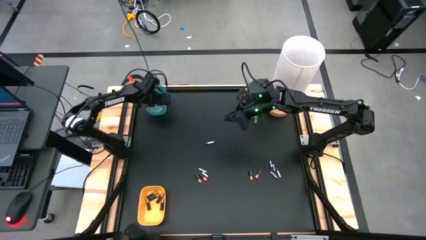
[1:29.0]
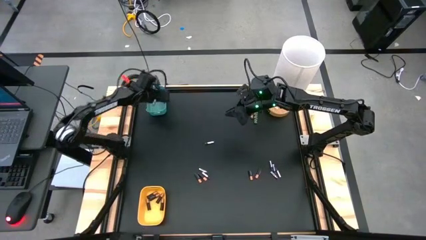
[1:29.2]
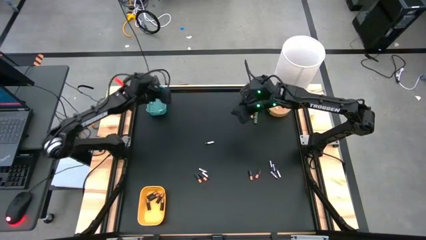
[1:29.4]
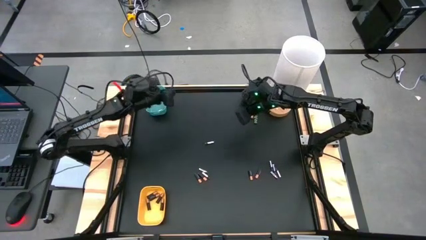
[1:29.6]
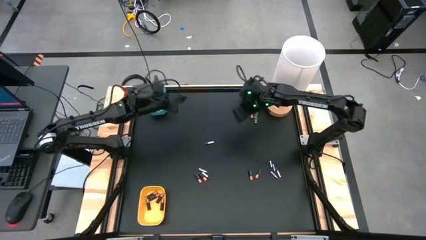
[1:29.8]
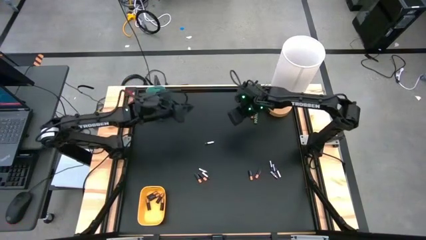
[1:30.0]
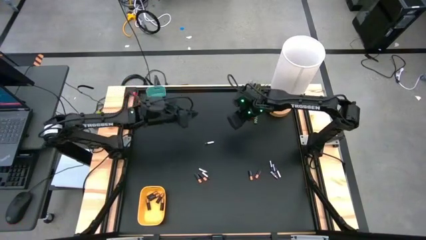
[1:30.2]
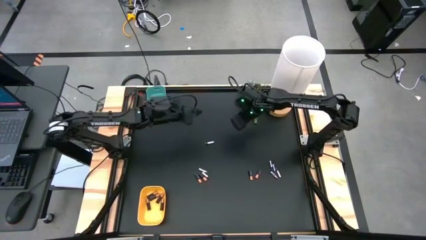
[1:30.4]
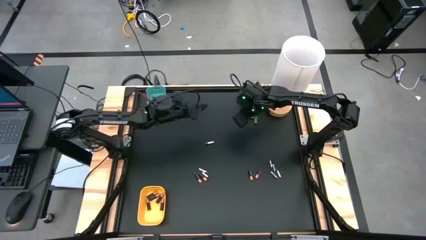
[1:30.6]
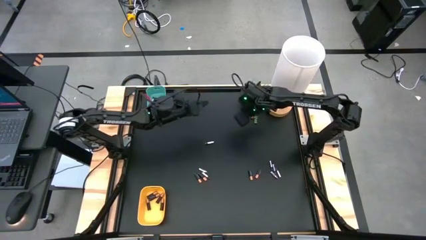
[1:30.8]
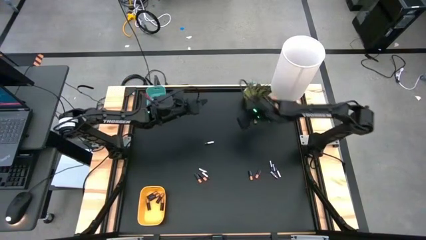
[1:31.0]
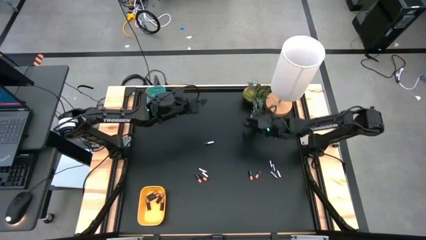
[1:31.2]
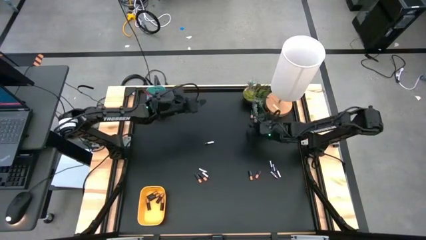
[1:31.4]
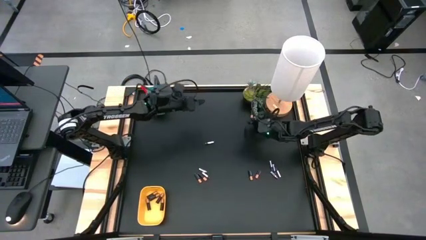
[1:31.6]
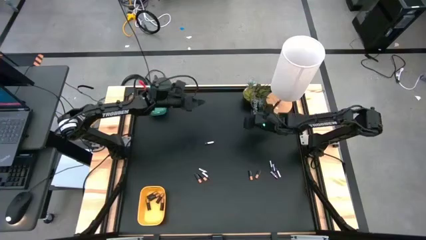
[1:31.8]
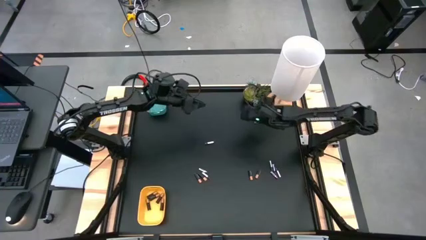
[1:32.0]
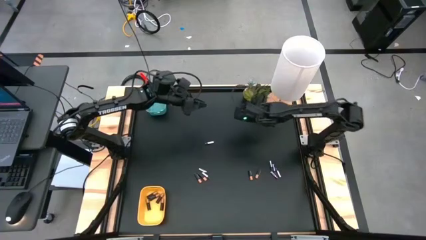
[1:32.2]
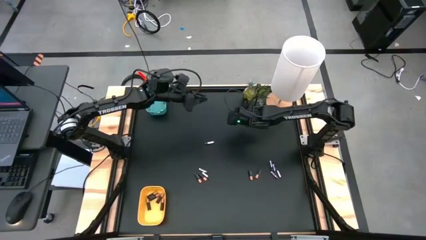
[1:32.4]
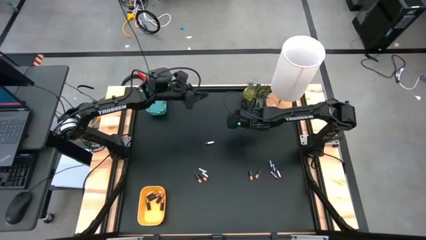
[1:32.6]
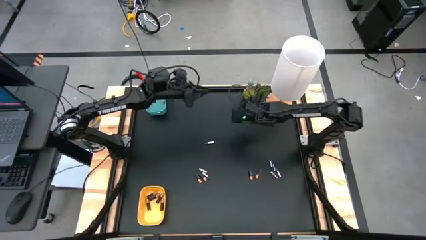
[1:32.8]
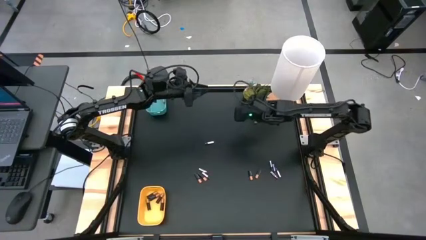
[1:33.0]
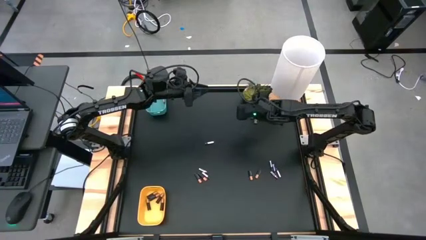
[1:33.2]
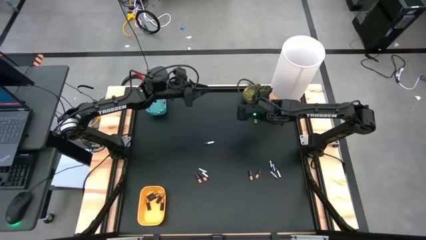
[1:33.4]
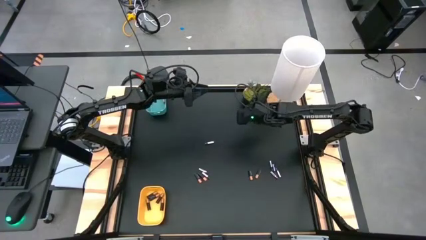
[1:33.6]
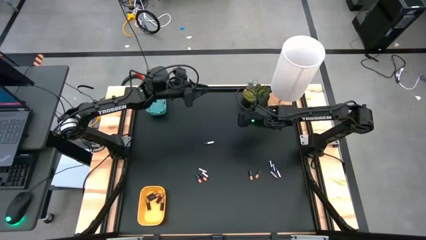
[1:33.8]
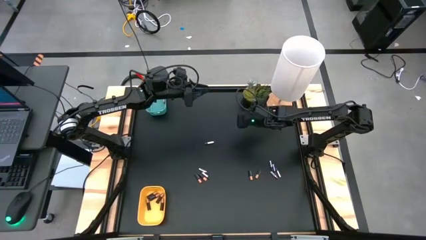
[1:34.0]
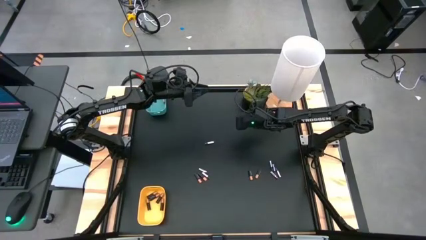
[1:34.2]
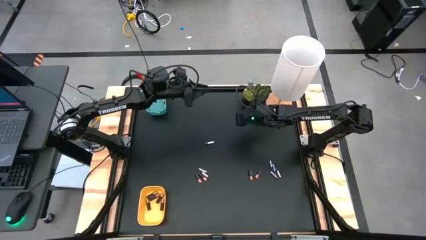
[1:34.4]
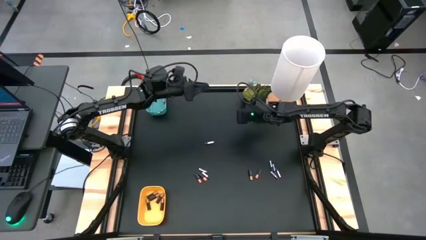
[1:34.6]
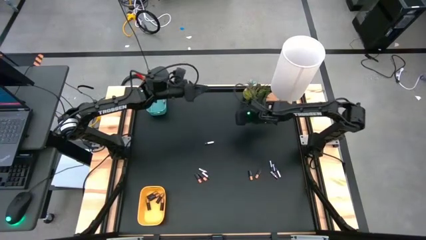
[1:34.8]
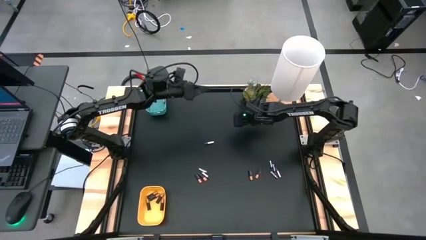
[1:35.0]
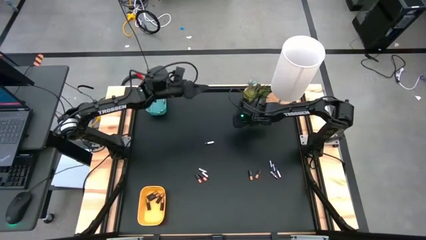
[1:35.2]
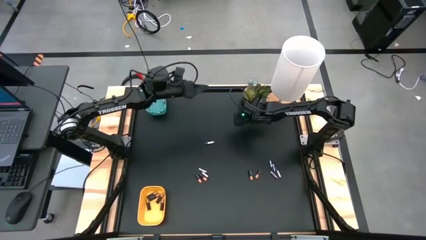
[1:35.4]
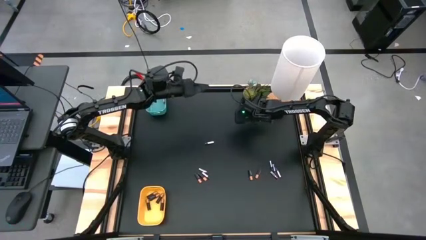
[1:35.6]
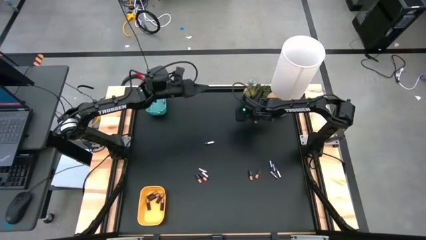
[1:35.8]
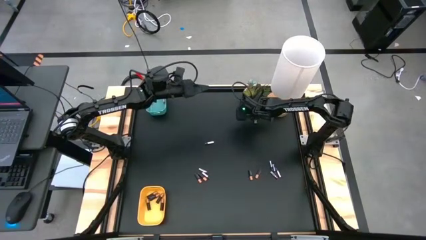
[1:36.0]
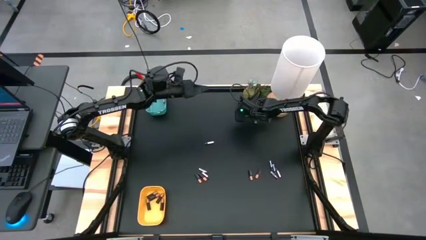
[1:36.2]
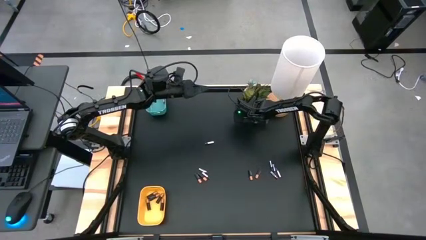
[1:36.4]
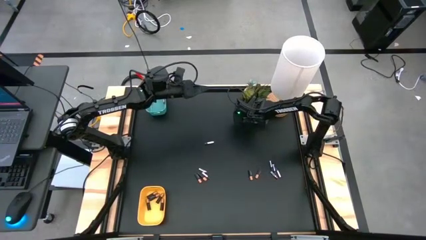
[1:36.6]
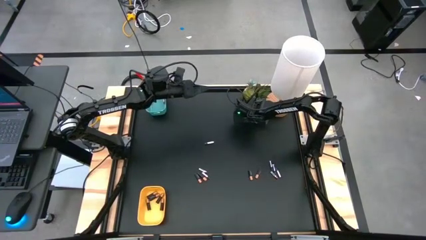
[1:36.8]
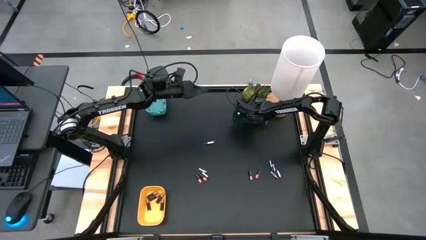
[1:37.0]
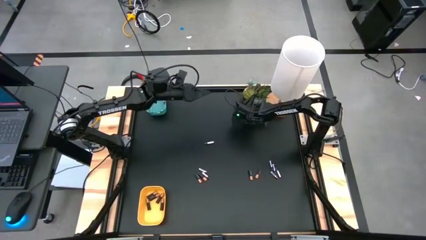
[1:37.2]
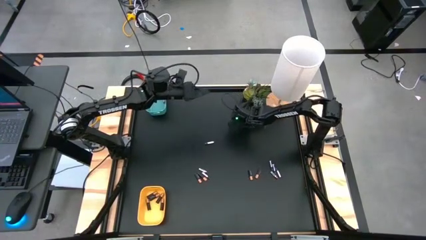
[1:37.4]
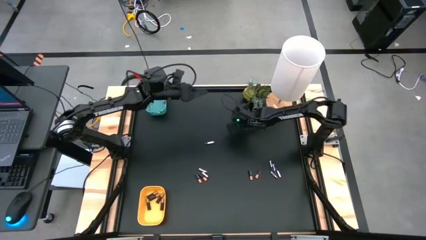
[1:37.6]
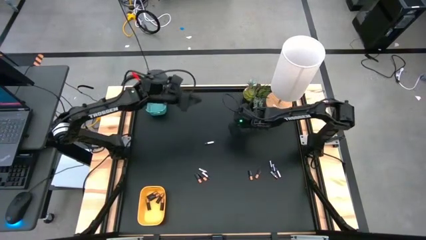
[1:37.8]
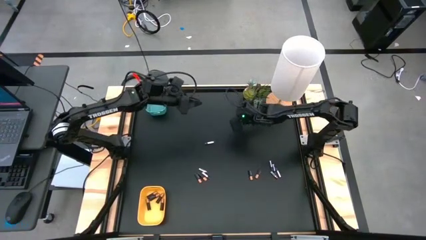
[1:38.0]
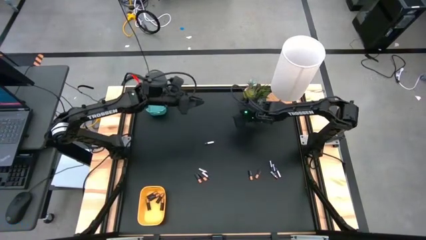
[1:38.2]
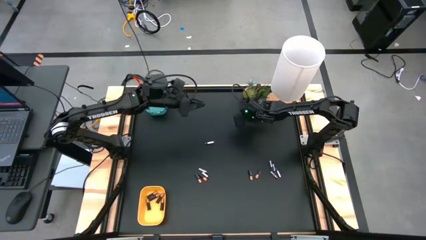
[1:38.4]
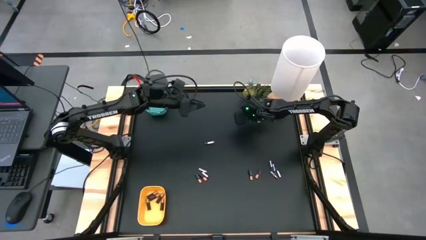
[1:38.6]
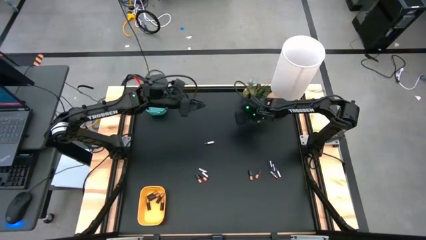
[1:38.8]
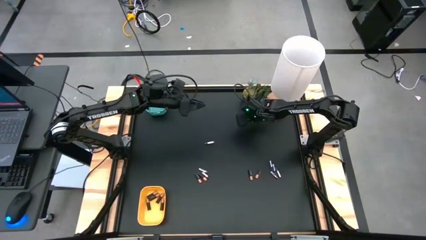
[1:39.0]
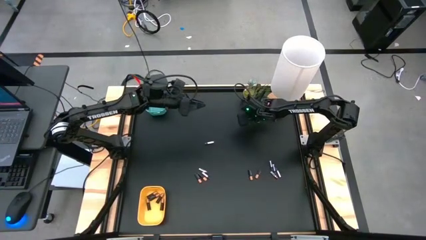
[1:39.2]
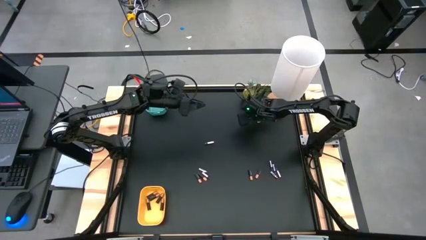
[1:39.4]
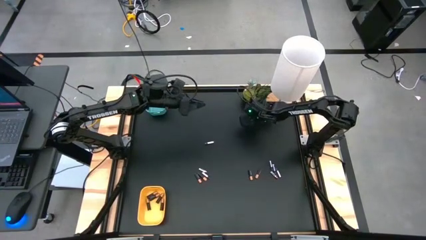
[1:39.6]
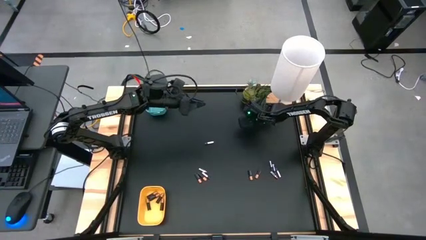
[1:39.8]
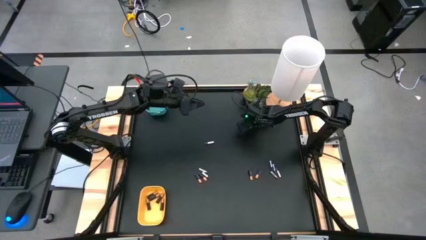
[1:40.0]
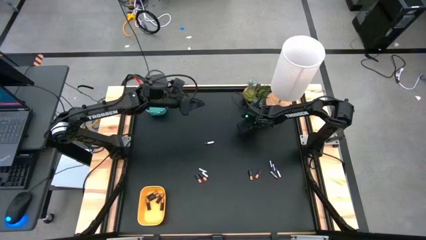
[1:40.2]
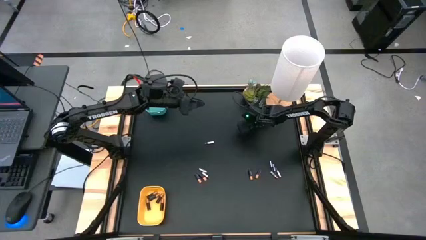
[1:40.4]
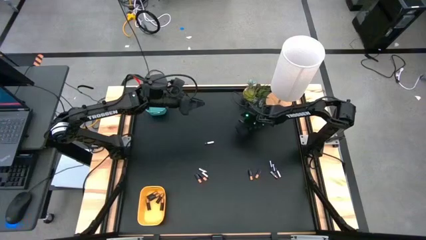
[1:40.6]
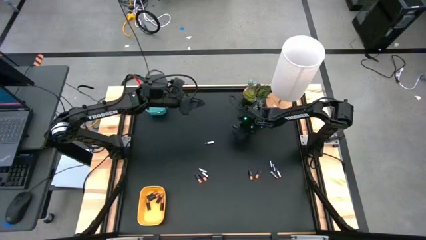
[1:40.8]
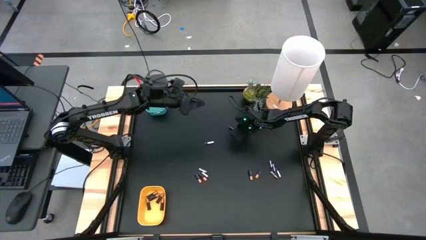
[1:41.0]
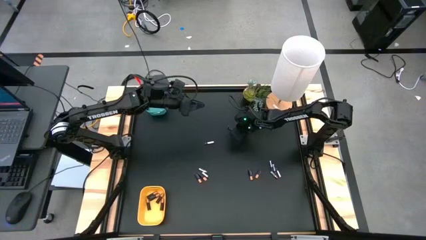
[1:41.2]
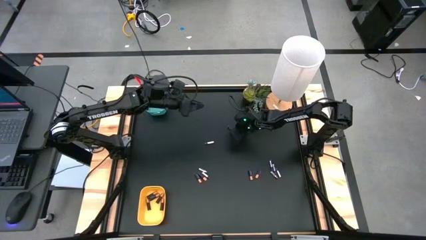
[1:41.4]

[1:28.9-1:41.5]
Task: Sort batteries
Put the black battery into the yellow bin

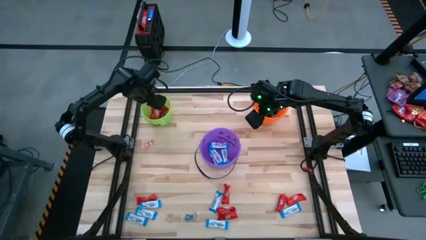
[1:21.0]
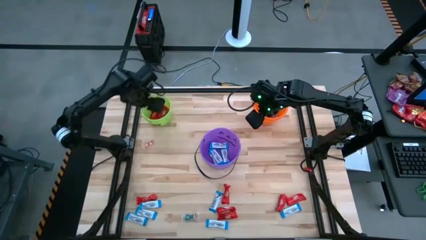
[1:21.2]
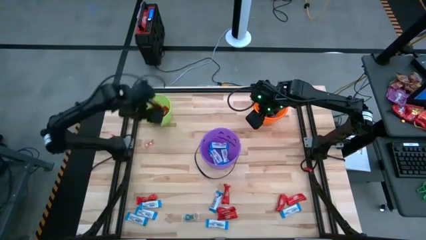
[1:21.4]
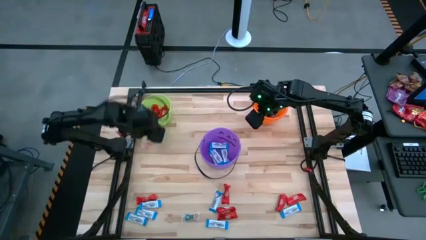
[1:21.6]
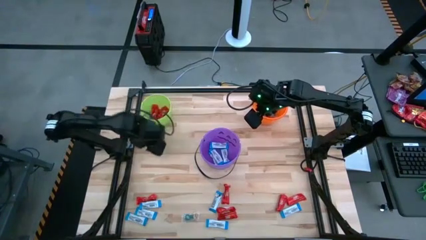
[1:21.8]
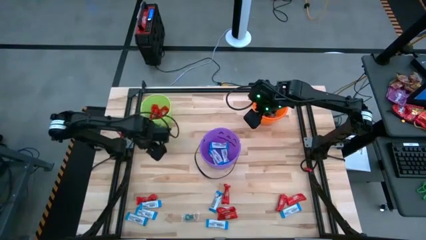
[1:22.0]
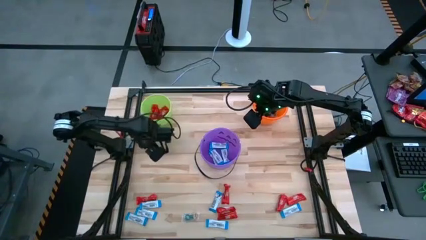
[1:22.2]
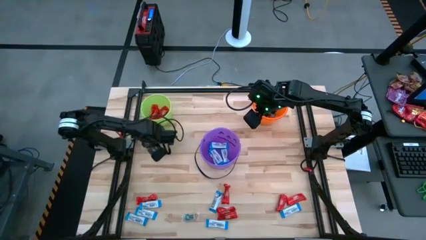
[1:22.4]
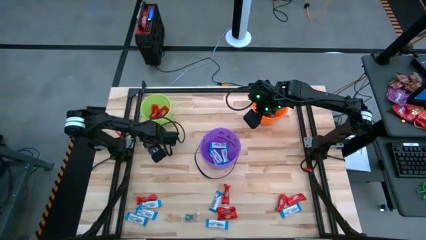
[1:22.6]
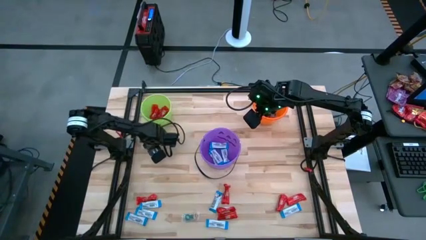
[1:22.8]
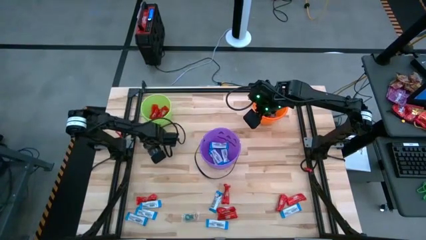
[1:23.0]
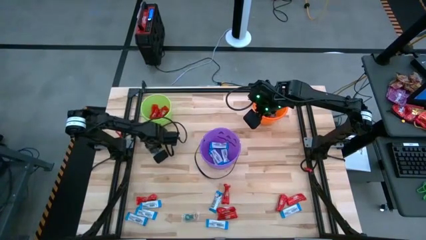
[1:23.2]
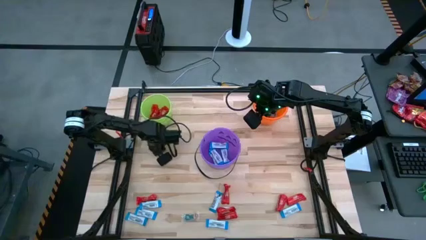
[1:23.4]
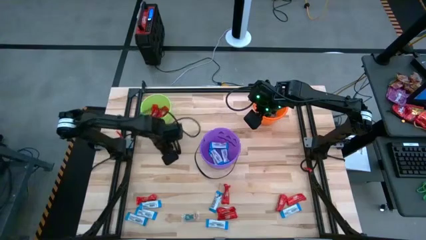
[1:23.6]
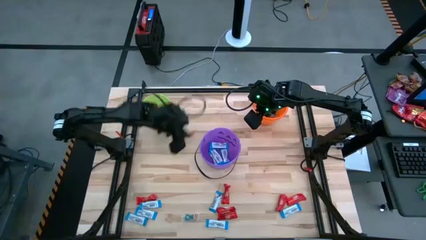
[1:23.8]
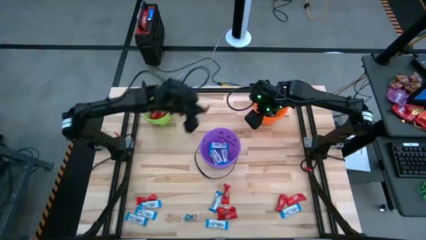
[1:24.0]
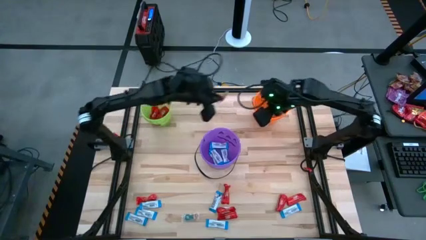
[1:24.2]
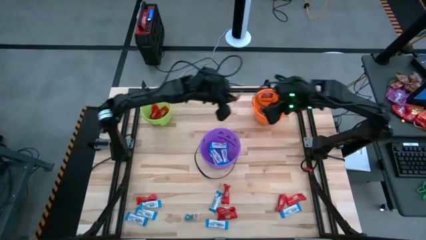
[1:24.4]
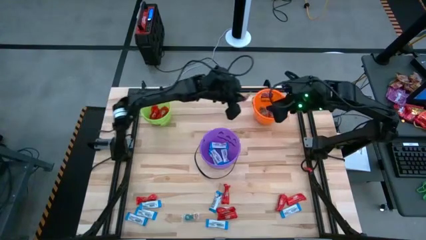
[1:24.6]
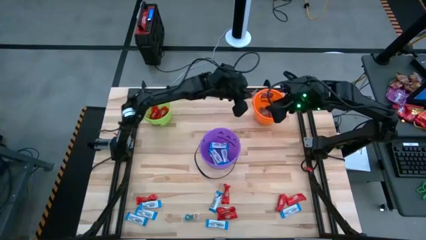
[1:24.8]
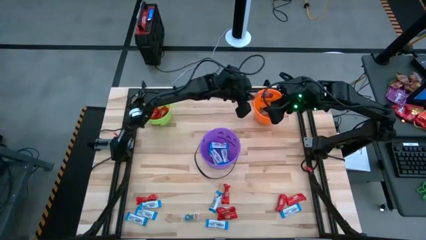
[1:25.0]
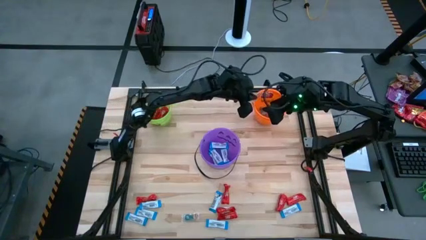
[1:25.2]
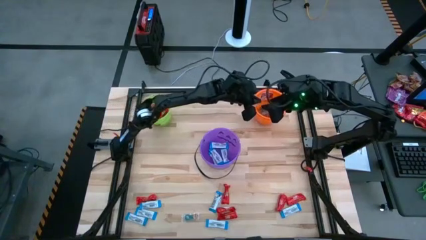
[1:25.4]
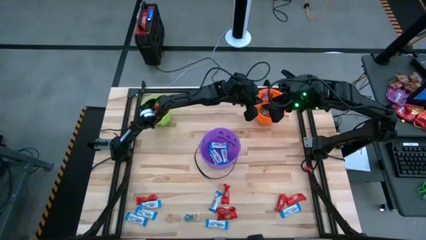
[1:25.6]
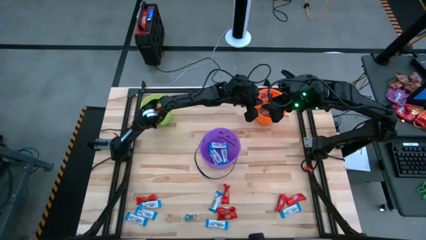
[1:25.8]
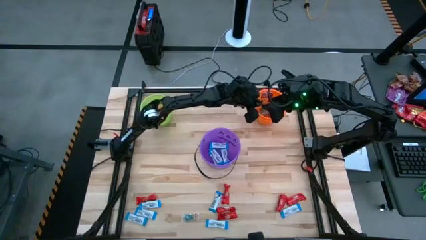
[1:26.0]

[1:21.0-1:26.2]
Task: Sort candy by brand, put in halloween buckets
Put the orange gummy into the orange bucket
